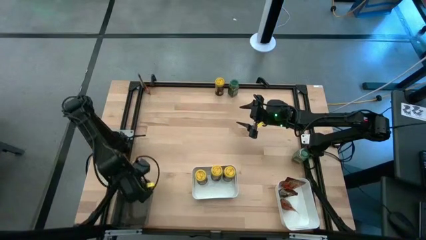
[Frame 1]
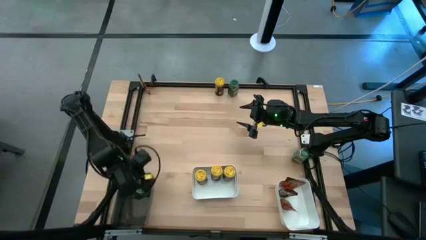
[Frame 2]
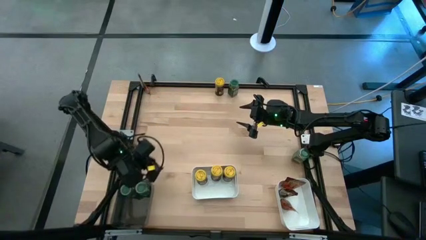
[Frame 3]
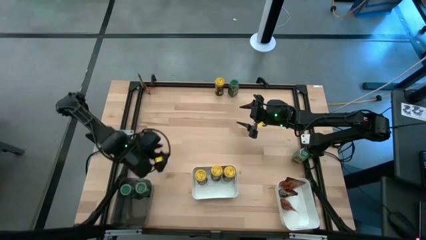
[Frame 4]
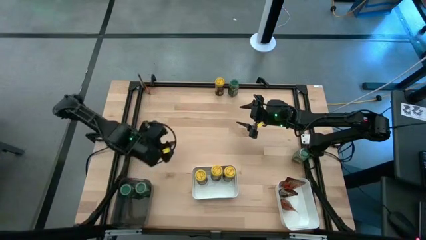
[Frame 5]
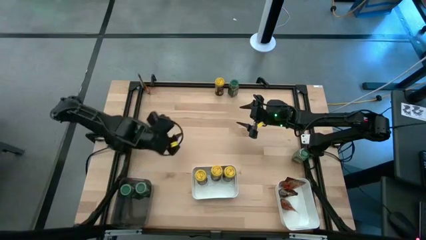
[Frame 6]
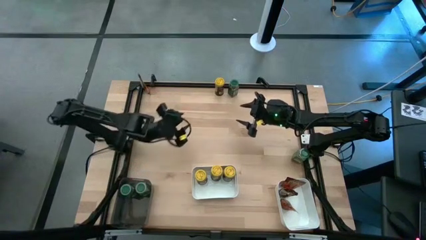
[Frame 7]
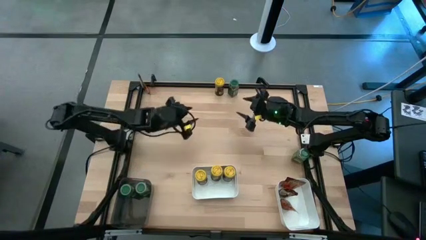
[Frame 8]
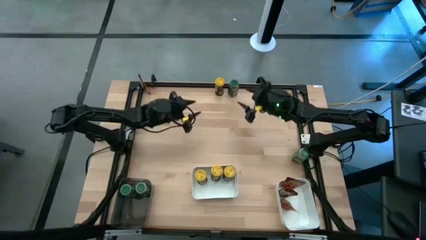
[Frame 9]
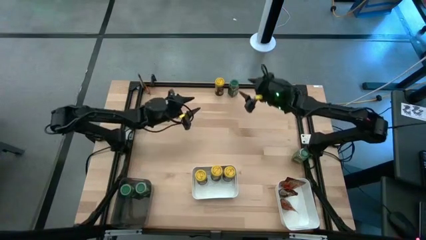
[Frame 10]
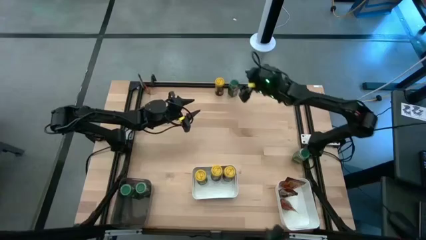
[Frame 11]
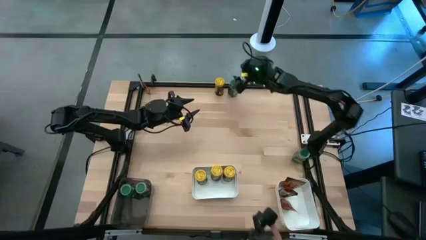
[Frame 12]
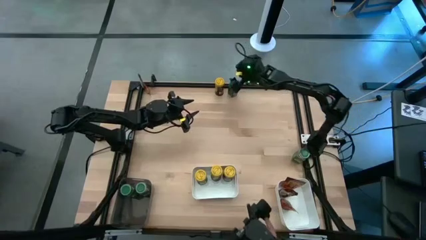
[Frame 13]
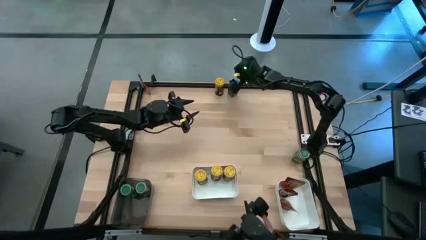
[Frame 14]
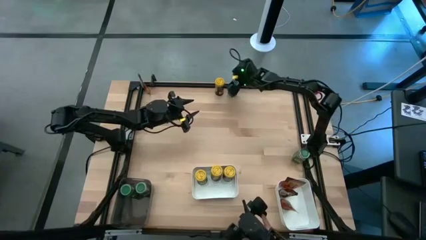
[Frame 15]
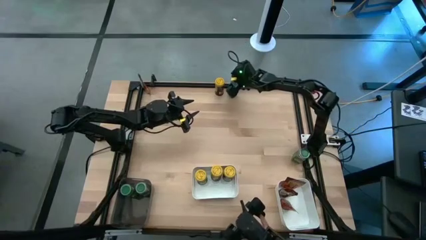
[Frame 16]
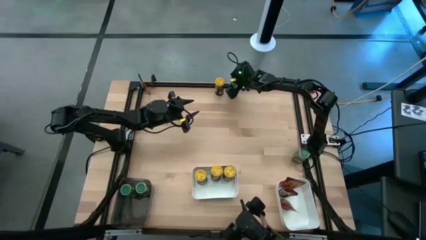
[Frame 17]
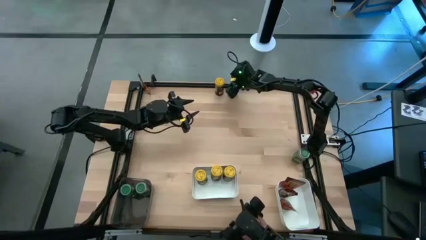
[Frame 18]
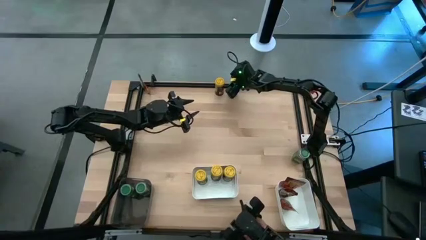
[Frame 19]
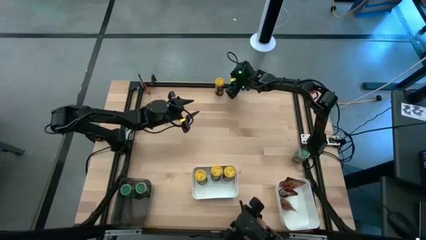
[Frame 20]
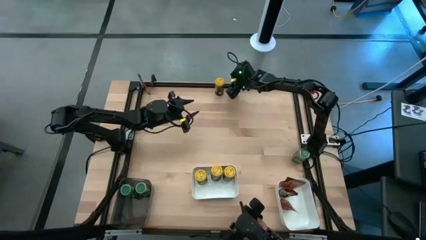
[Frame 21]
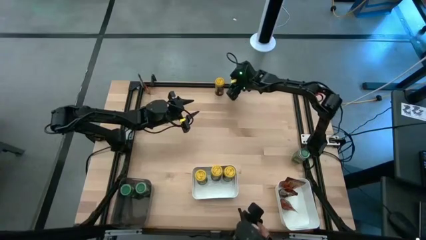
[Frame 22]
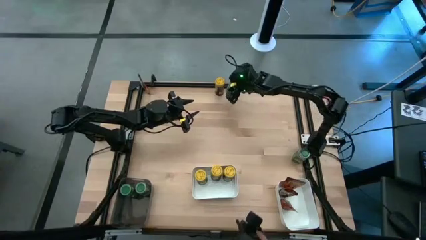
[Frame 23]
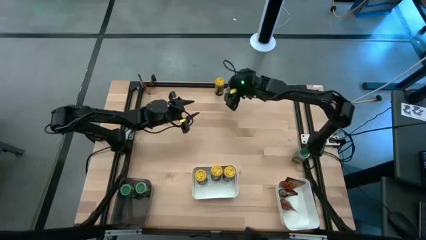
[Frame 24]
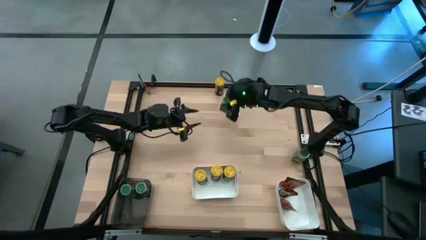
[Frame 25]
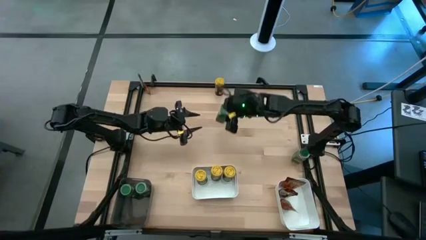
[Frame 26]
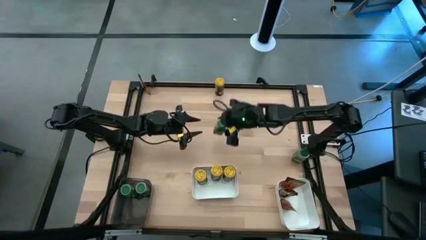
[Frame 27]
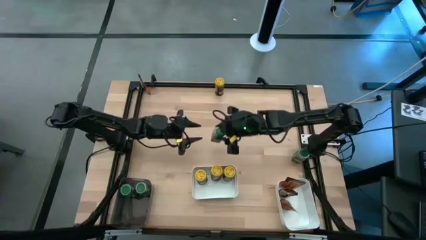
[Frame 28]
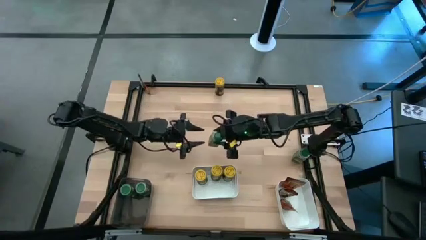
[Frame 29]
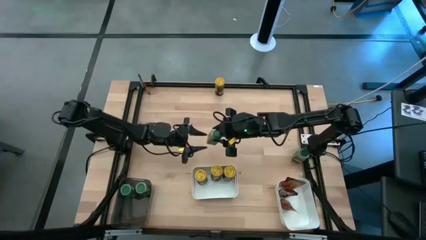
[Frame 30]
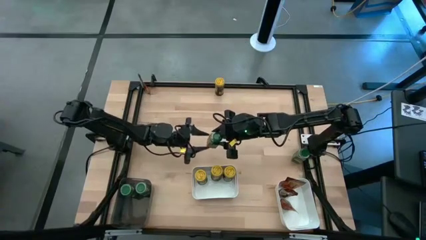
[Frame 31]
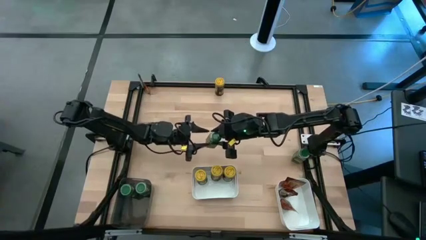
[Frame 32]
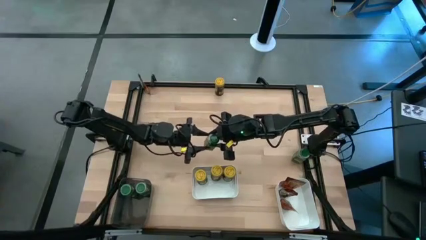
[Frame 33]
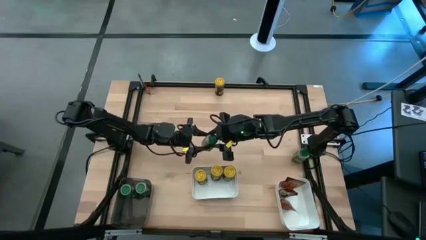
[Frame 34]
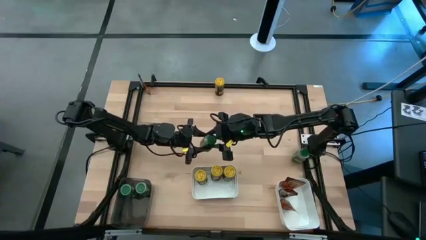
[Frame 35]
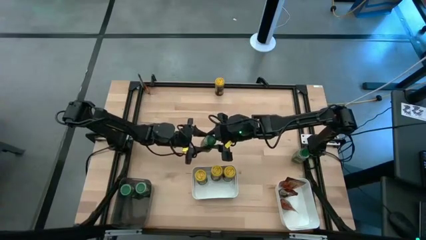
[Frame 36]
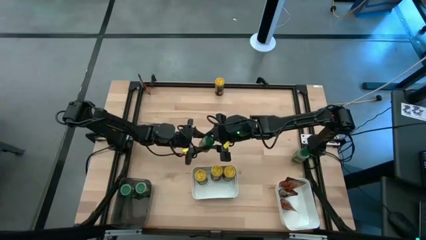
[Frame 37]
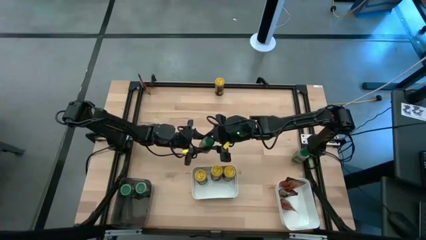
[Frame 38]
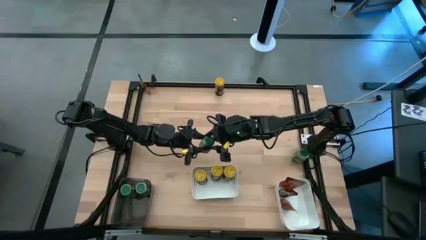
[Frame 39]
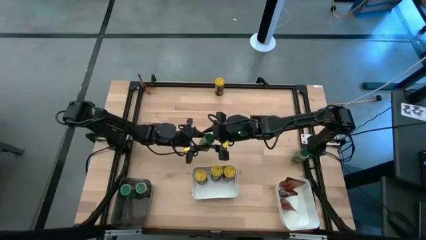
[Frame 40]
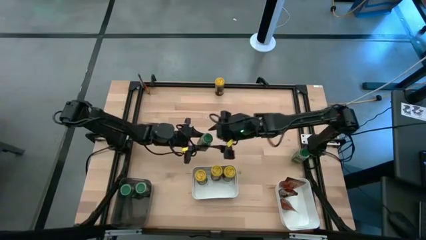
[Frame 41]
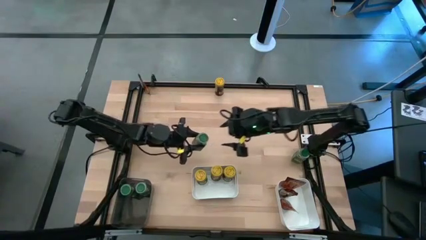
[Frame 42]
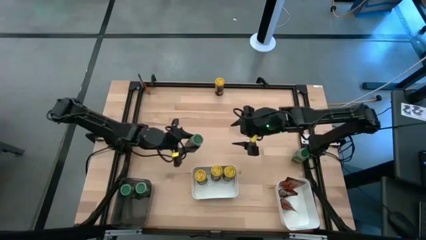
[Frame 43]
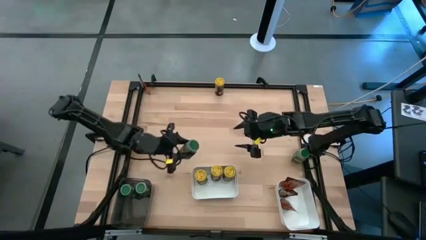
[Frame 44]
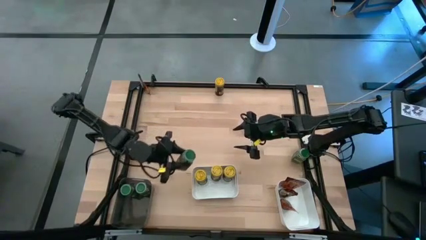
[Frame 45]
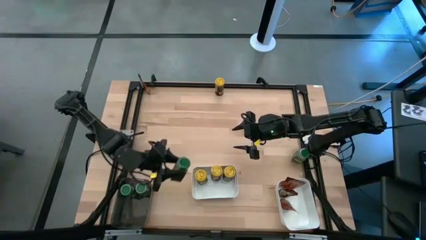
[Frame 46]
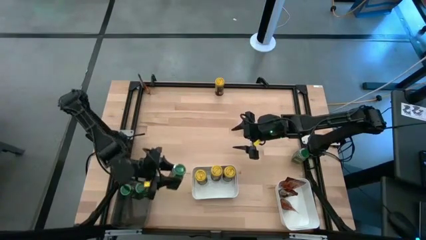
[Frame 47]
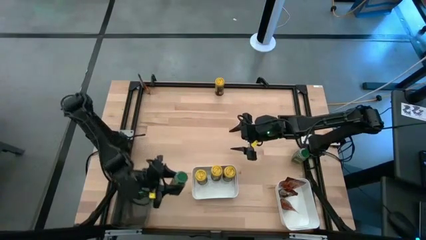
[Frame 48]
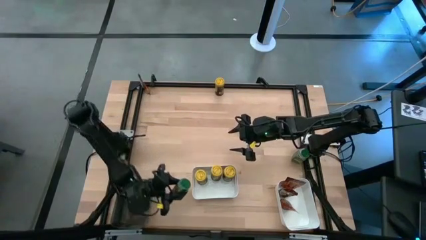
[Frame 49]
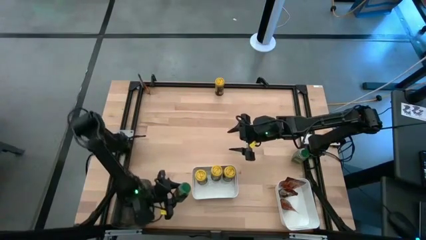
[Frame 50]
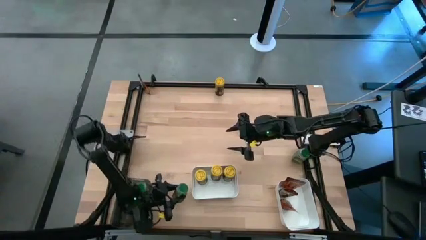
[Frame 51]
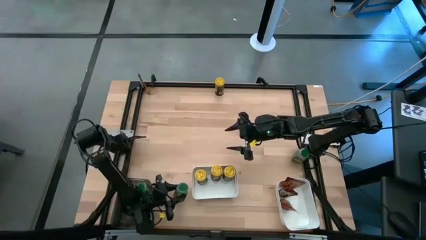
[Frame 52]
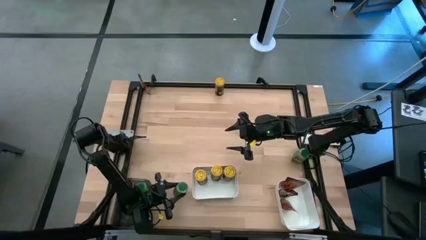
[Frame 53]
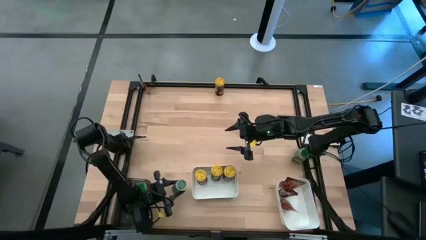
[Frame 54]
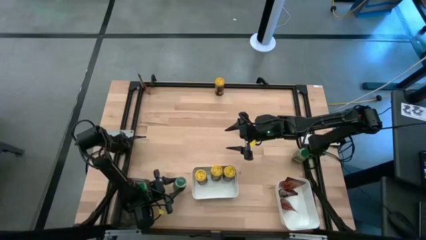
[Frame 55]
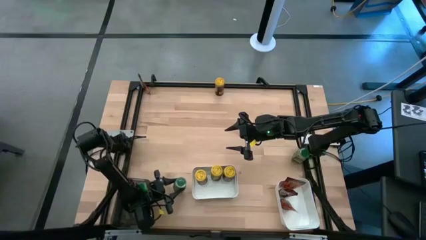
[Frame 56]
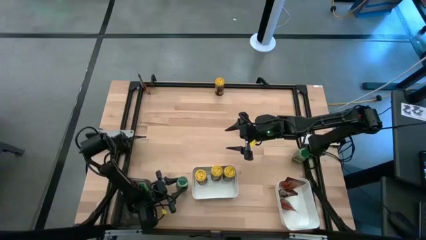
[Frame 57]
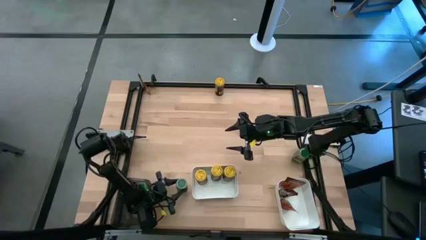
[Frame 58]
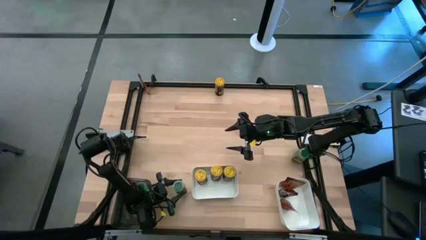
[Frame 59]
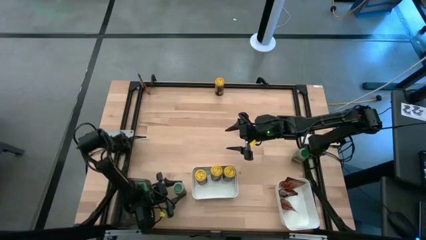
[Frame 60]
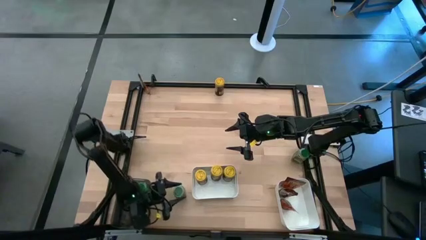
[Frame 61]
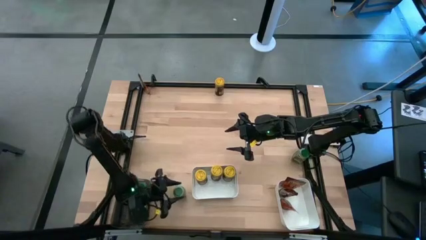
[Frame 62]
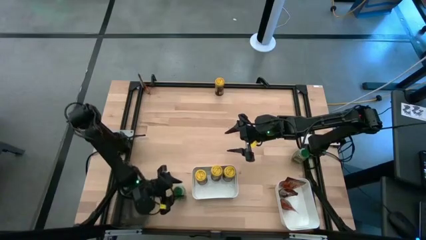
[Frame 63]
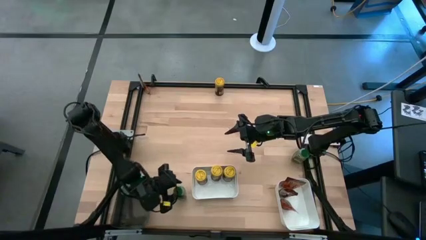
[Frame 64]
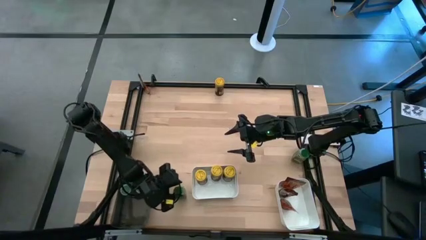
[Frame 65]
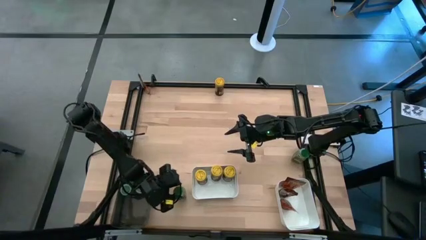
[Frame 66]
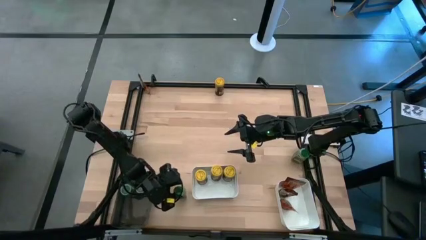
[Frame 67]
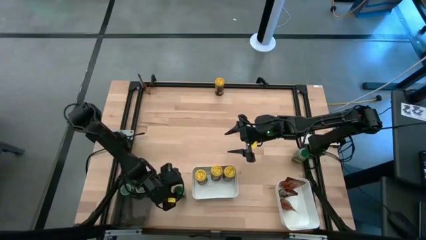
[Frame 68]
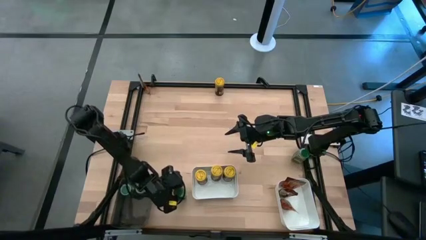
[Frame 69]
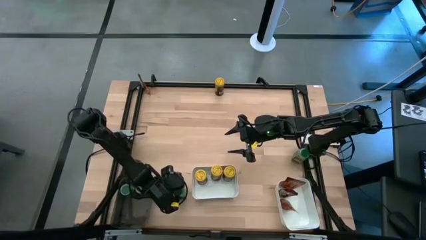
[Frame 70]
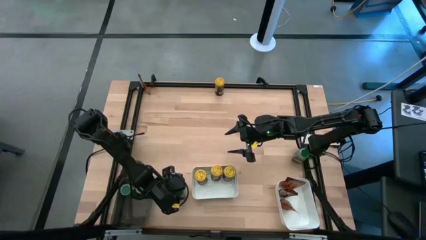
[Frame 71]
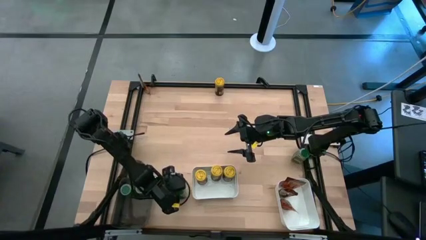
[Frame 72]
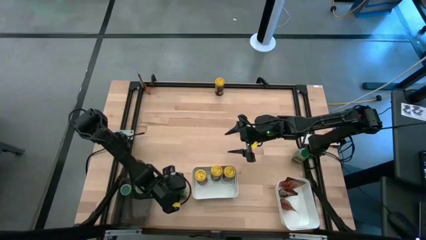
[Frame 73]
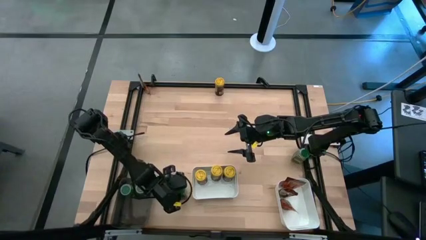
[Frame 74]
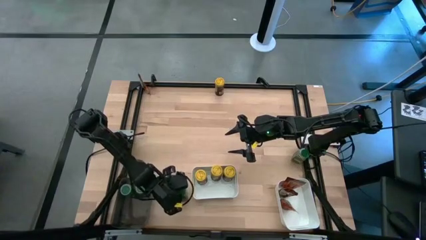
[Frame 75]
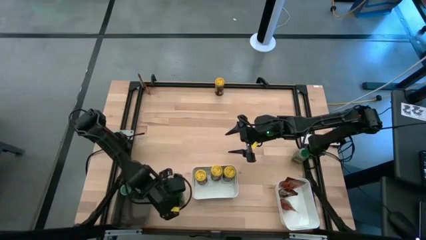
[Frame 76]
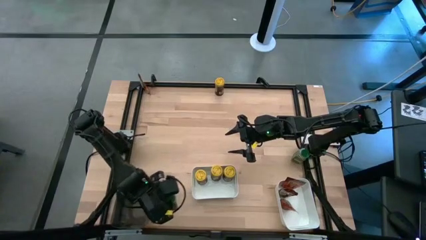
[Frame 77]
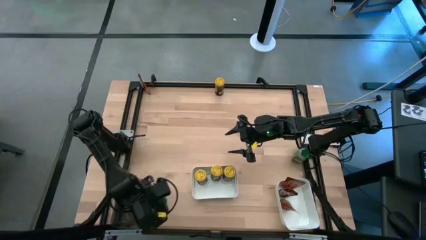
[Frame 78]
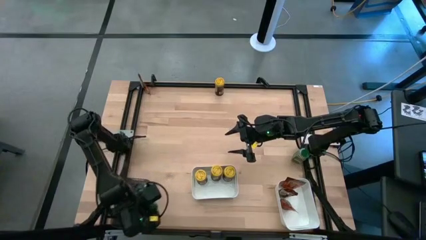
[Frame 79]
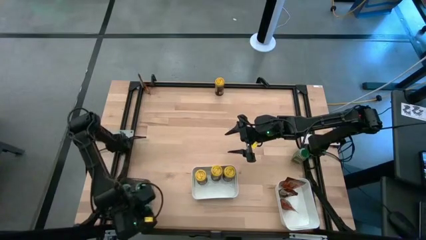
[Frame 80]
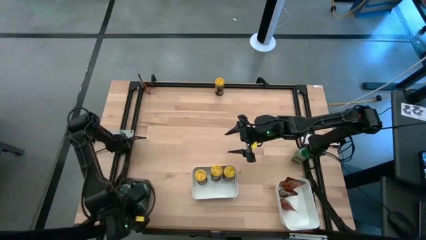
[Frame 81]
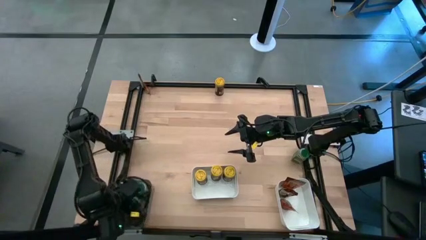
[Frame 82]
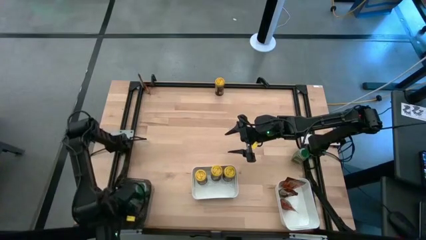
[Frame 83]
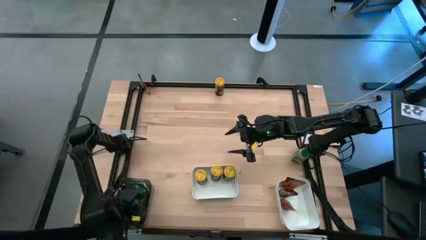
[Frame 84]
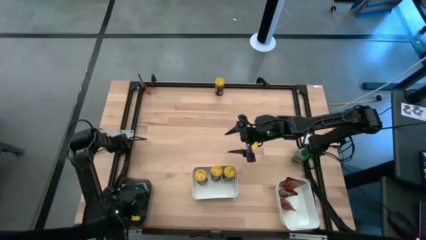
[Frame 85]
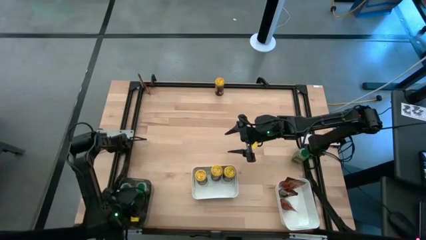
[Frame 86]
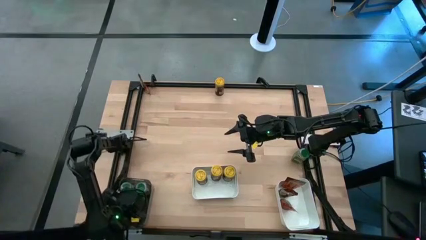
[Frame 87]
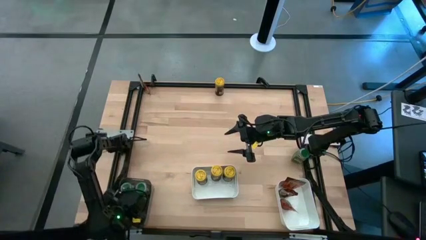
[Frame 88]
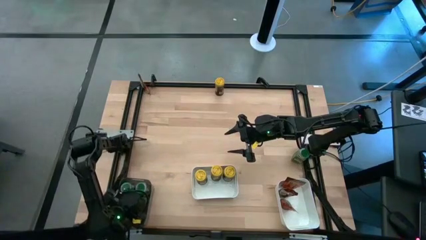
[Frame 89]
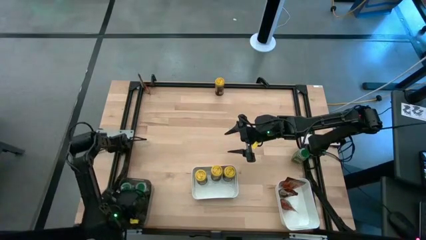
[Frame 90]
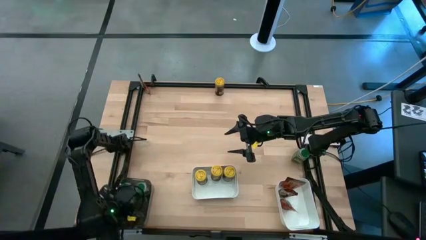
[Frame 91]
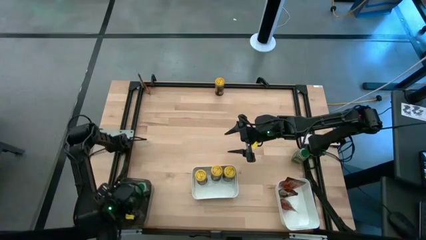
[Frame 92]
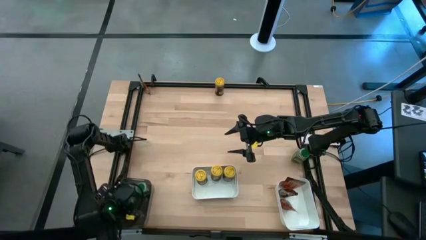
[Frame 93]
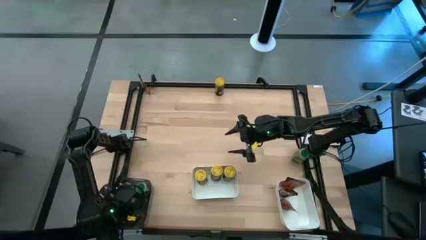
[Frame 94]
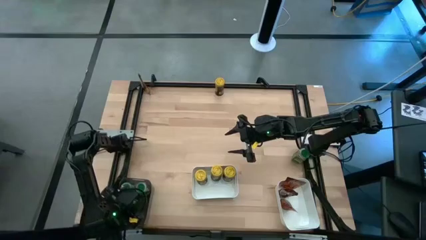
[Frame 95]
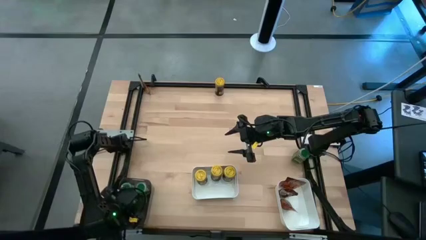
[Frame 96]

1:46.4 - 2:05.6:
Task: Sort spices by type
Put the top green seasoning bottle into the black bin
